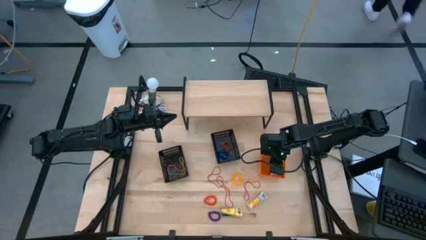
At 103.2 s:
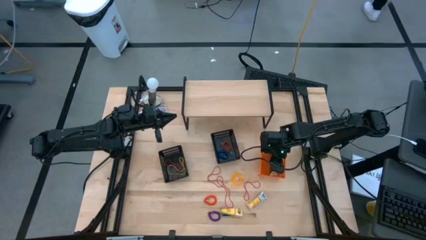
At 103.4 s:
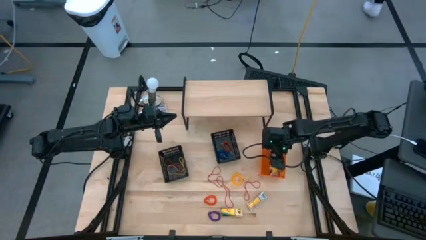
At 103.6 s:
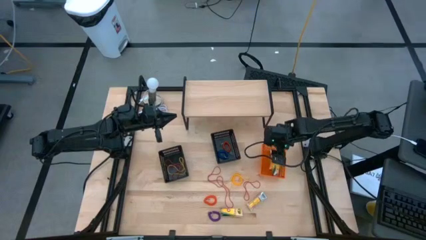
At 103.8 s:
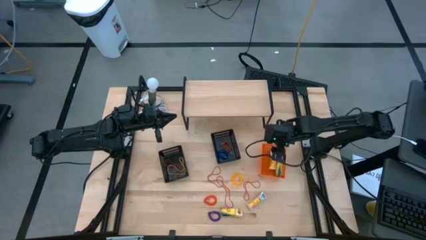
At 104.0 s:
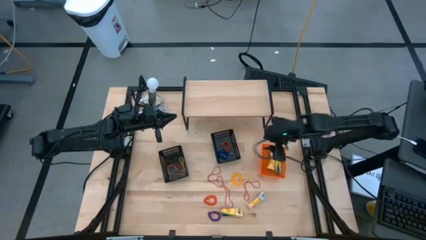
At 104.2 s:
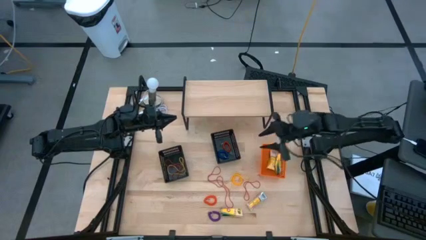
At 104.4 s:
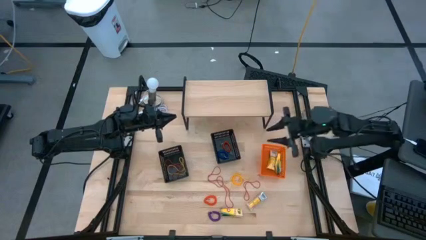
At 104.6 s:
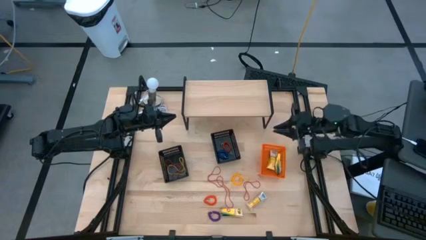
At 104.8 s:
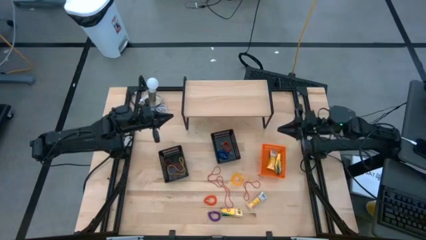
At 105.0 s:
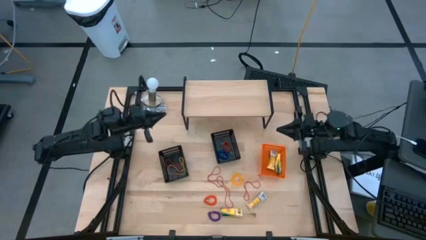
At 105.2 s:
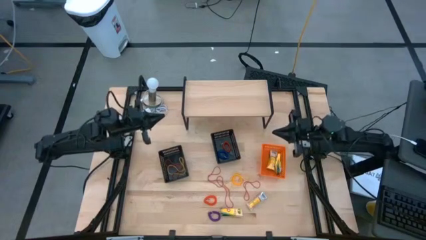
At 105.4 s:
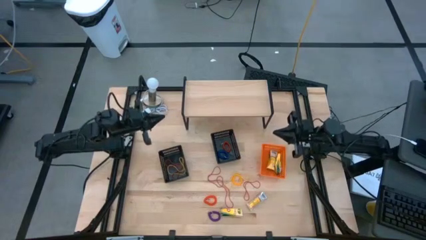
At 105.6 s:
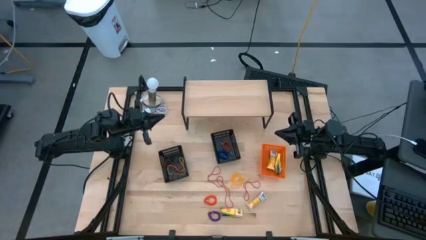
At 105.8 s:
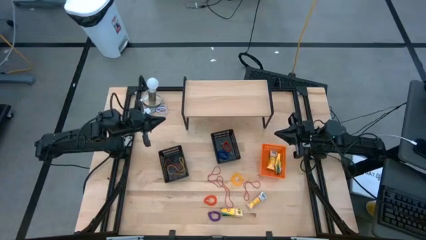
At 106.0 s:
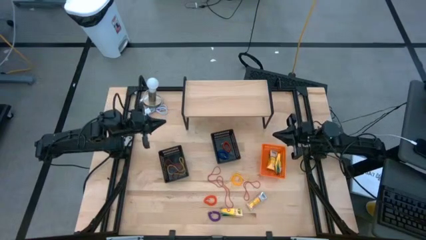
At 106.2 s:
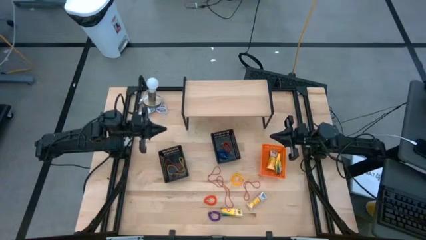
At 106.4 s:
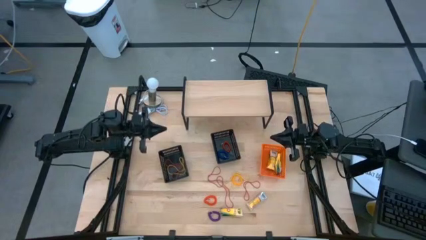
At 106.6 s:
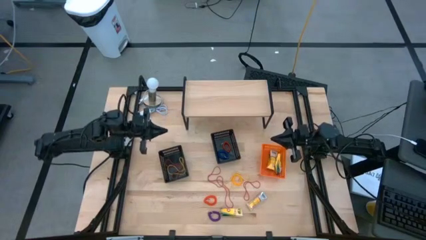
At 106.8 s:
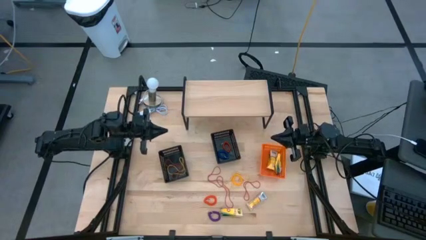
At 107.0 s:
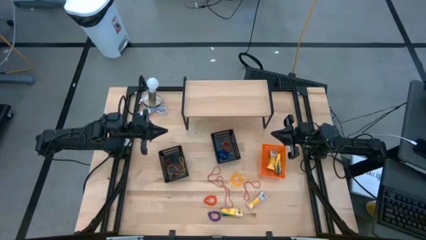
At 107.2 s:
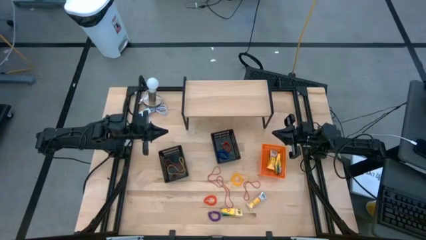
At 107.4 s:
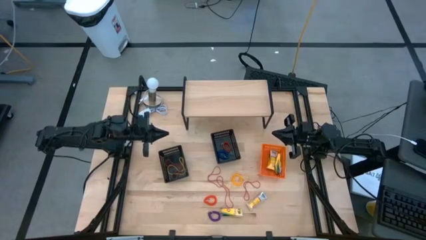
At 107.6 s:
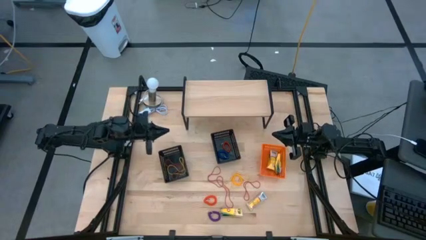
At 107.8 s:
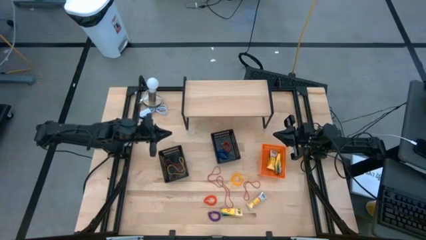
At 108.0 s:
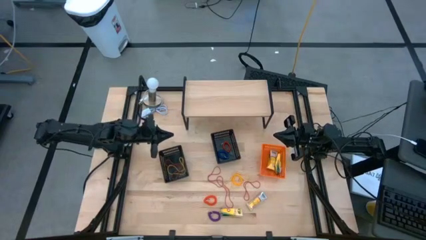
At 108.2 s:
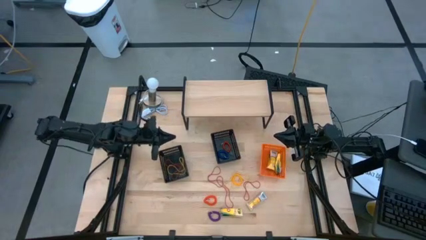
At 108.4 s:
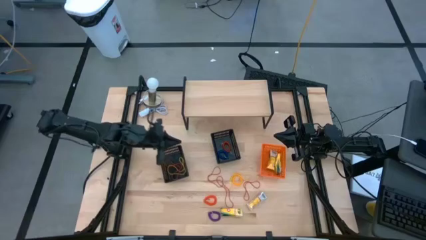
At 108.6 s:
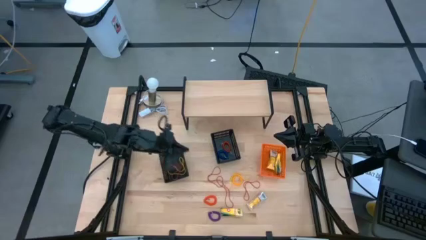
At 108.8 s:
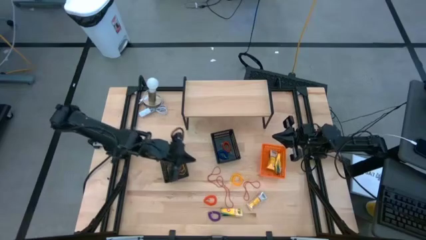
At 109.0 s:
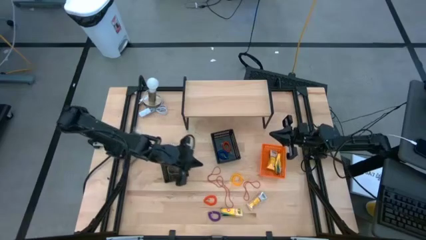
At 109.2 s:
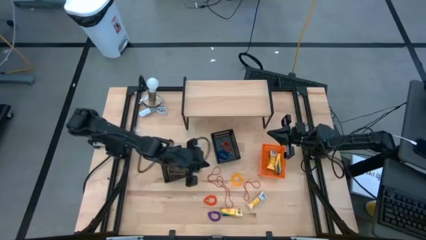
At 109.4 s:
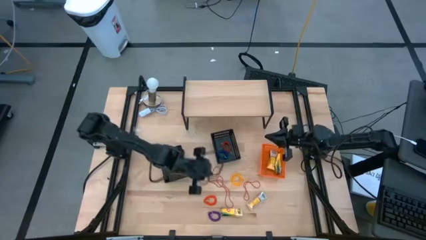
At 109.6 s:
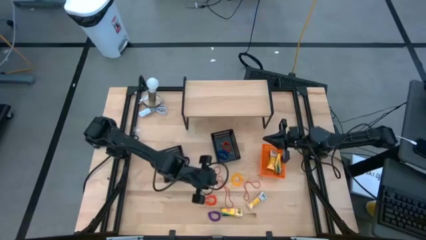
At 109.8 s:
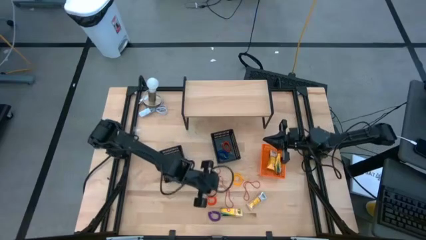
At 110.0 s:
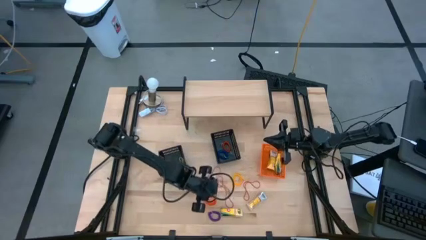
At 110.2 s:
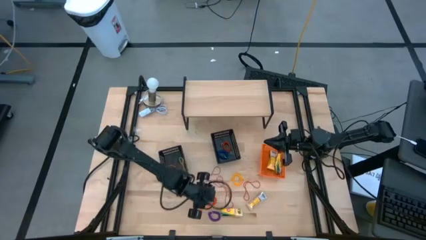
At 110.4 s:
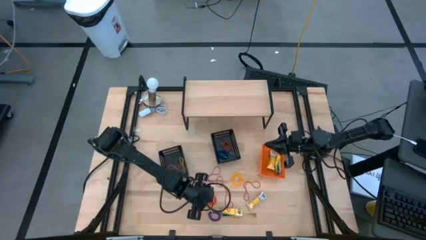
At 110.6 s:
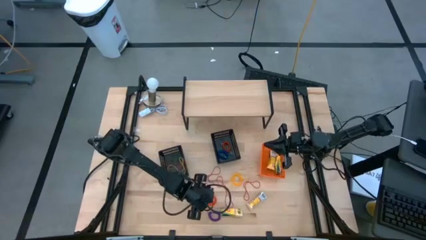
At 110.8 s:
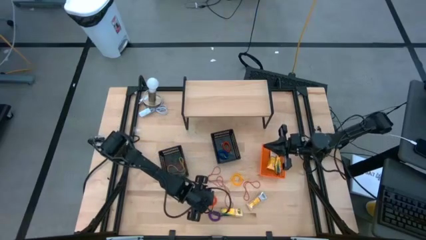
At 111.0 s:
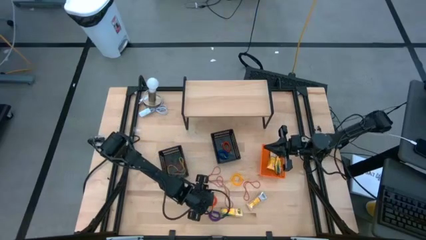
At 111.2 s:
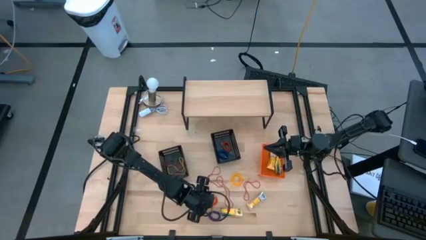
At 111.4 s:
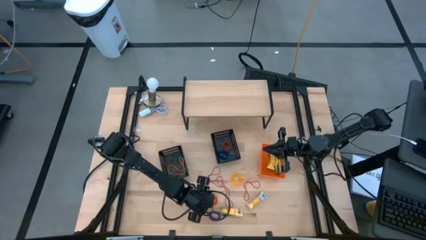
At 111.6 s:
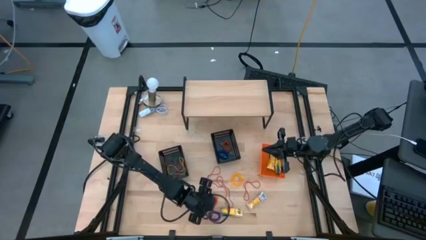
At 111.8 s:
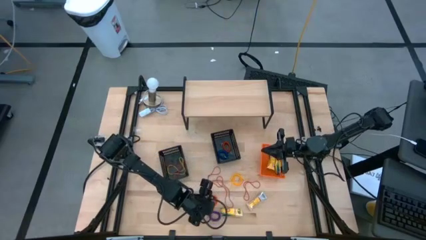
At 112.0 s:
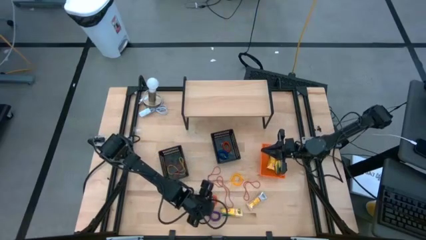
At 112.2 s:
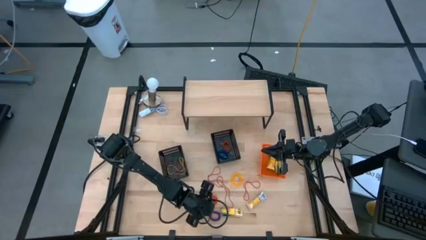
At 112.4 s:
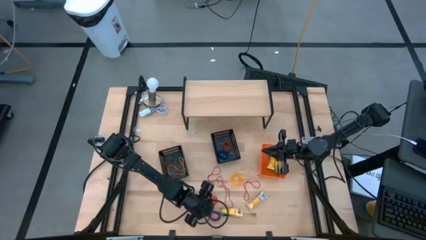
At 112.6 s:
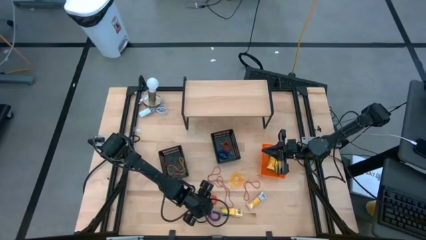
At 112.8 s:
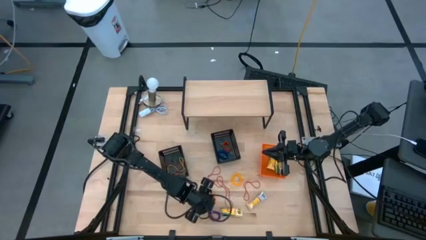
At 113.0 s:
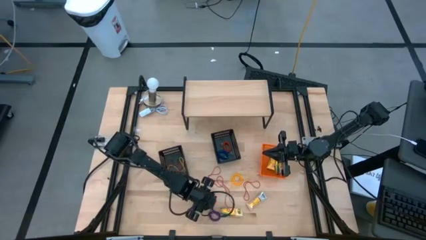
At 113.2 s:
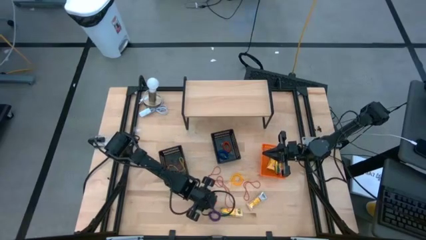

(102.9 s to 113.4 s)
Task: Pick & Place Office Desk Supplies
Put the red rubber band into the left black bin

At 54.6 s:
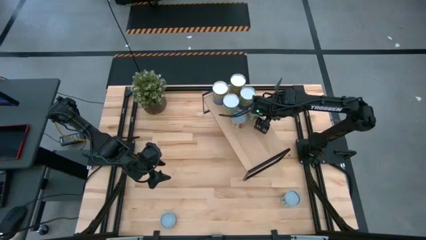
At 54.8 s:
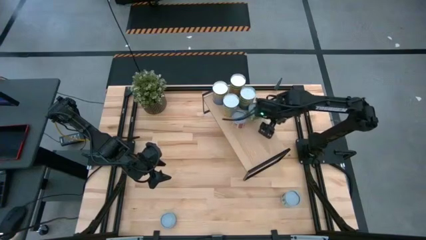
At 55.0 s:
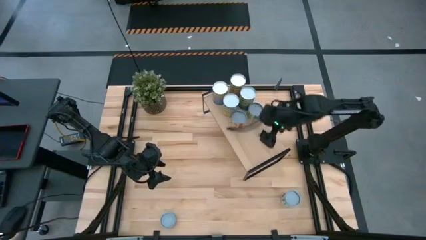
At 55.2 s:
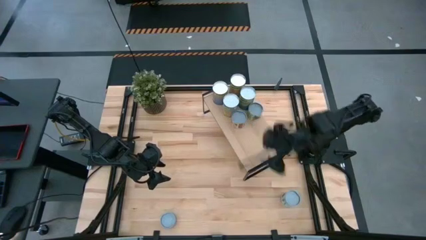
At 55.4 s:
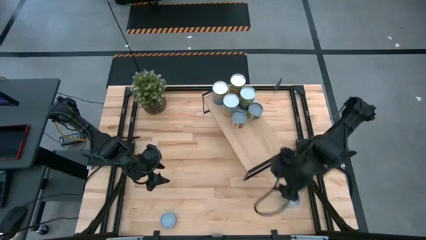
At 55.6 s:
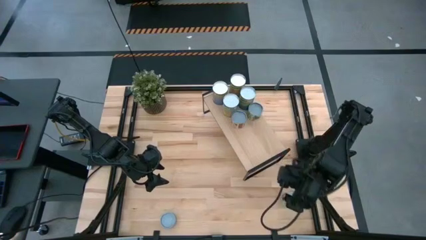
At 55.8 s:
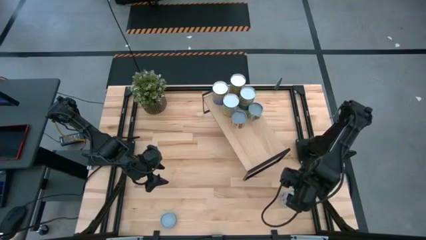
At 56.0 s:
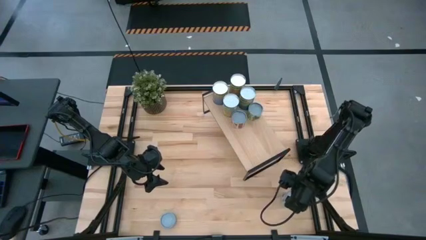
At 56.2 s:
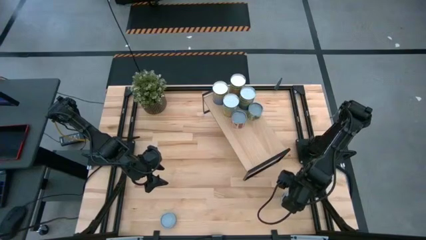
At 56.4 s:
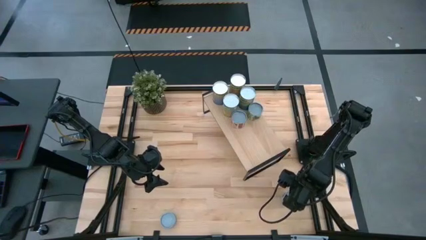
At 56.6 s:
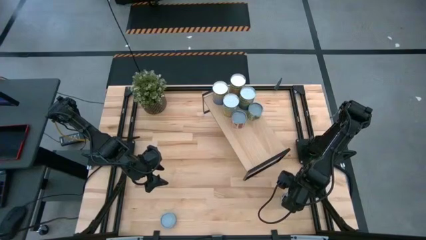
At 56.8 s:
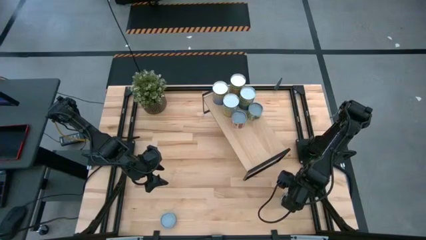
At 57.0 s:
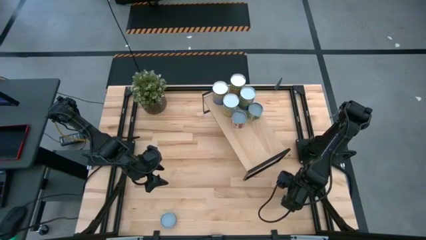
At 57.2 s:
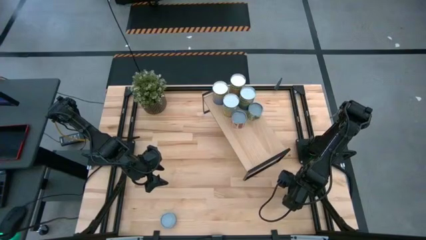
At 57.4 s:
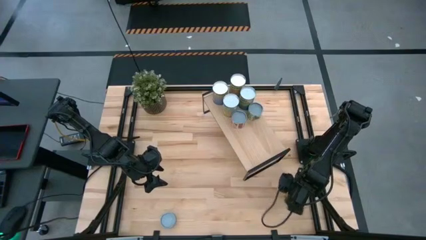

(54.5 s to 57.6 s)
Task: Pick and place cans onto a shelf
Put the canned vegetables on the shelf

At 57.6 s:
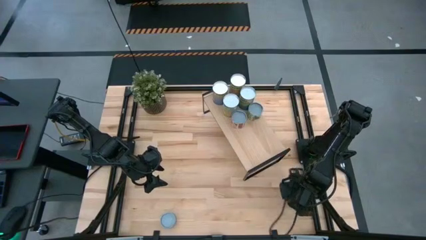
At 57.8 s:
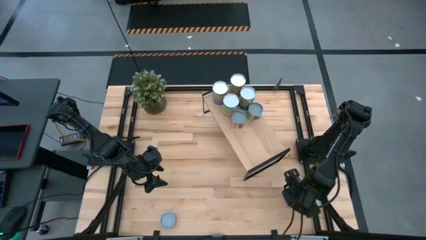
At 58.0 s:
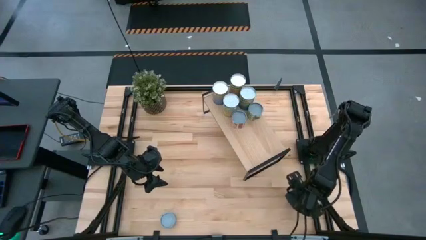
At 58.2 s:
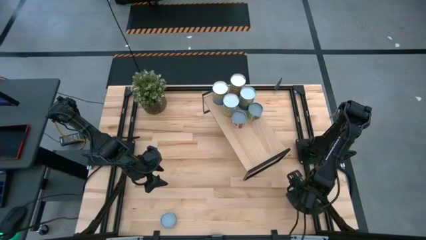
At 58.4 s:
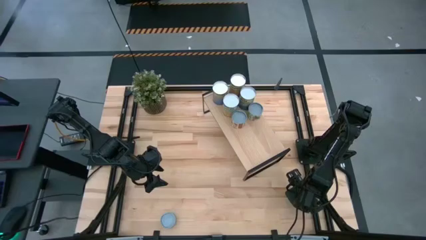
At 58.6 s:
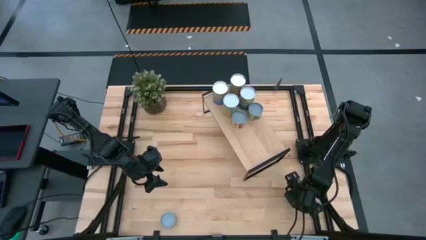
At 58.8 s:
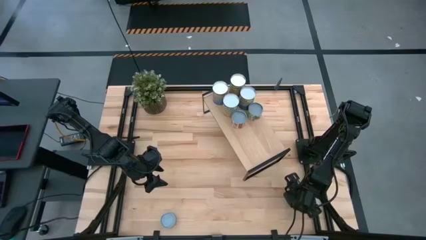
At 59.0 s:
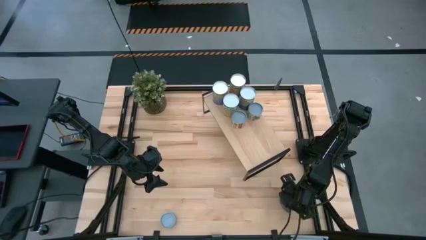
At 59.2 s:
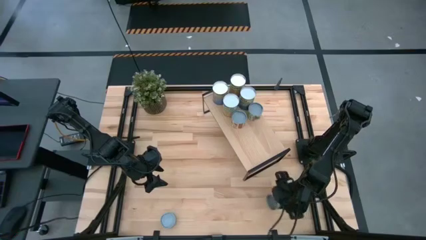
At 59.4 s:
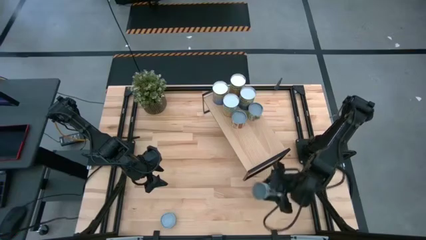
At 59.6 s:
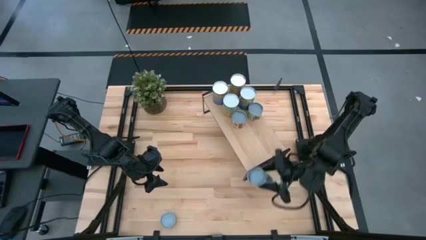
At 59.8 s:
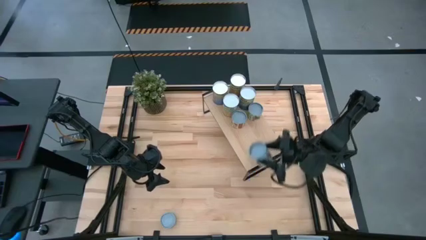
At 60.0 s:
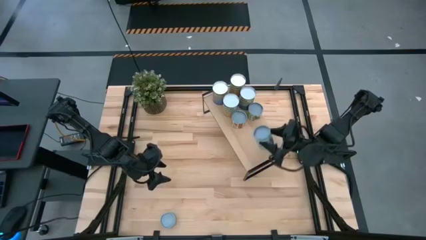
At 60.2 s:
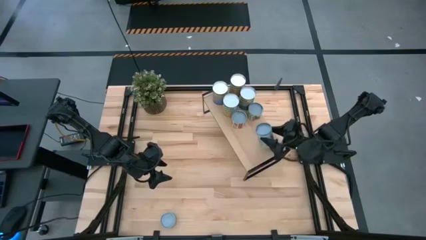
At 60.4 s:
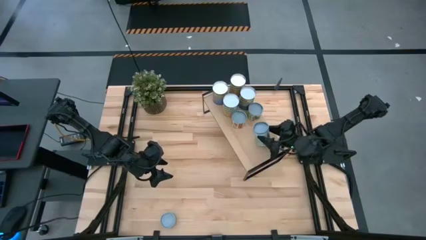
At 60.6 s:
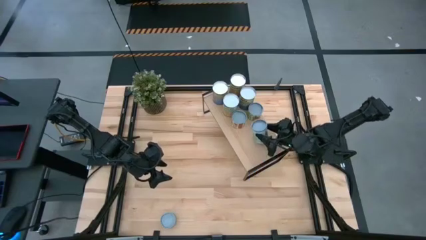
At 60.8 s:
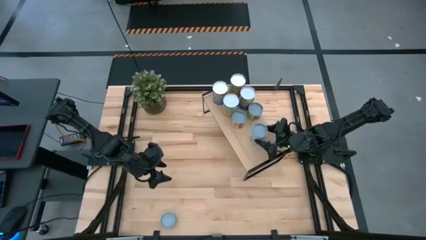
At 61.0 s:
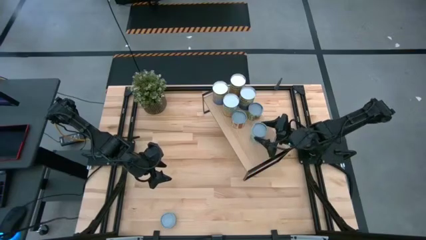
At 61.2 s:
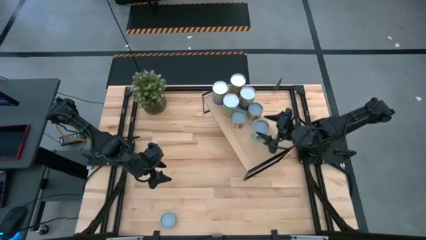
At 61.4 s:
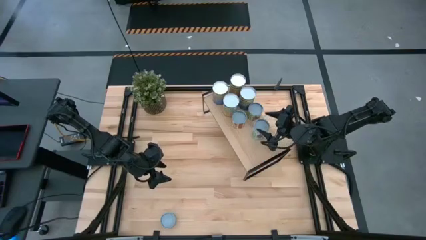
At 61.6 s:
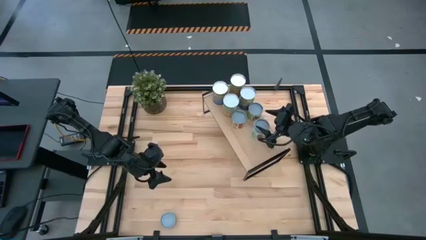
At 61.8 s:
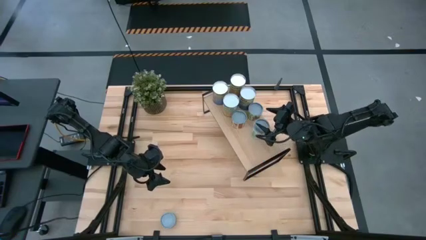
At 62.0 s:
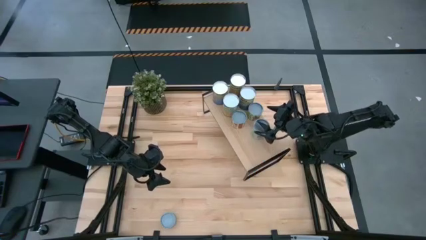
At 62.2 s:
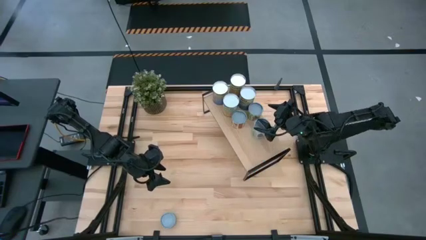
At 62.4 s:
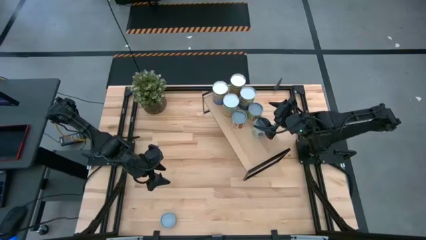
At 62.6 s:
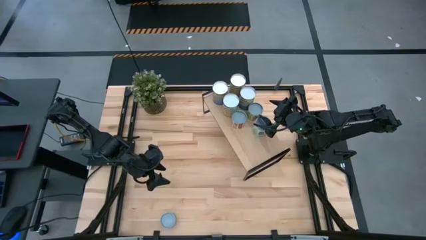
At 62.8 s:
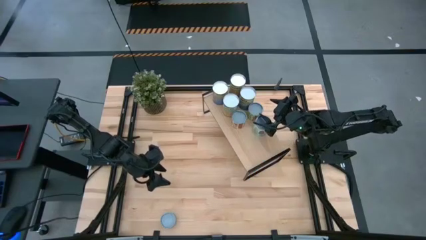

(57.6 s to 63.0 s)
Put the canned vegetables on the shelf
